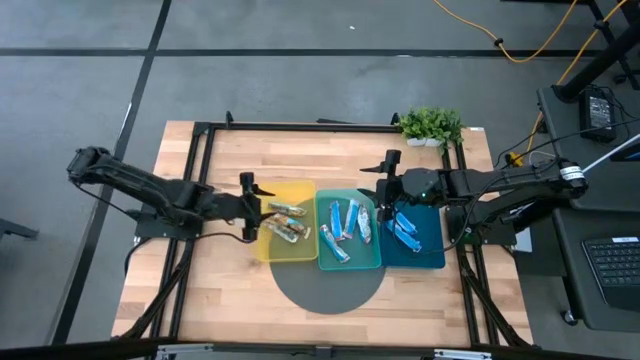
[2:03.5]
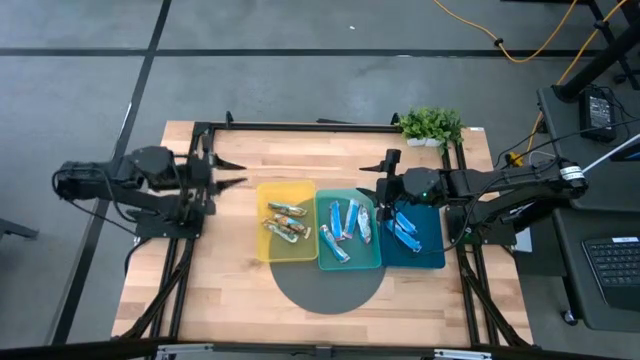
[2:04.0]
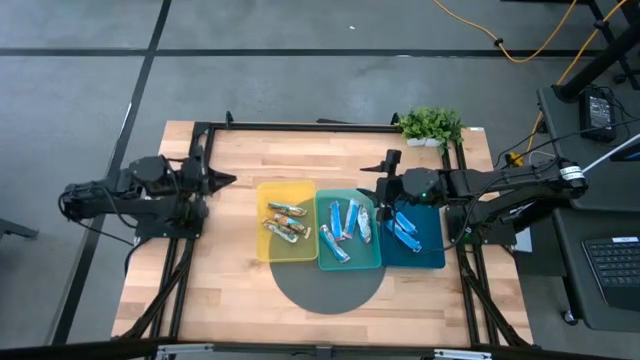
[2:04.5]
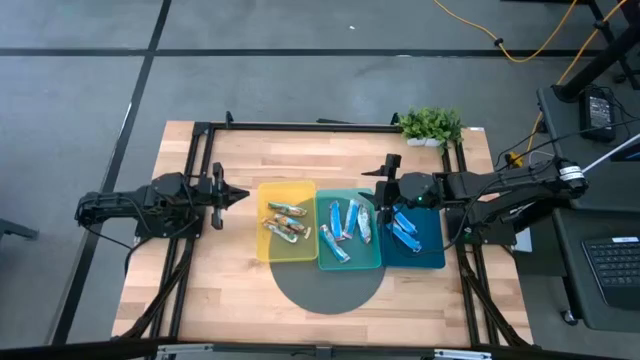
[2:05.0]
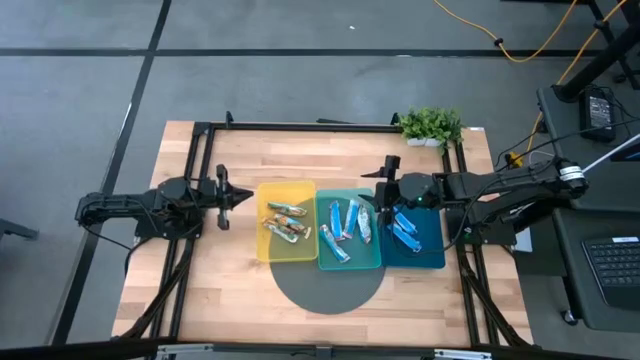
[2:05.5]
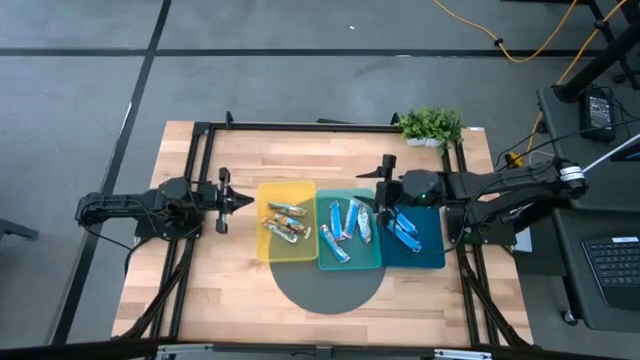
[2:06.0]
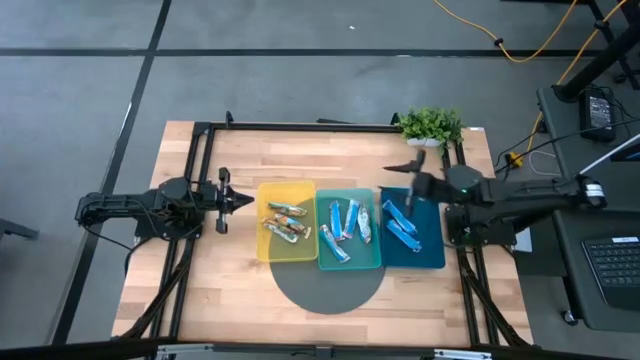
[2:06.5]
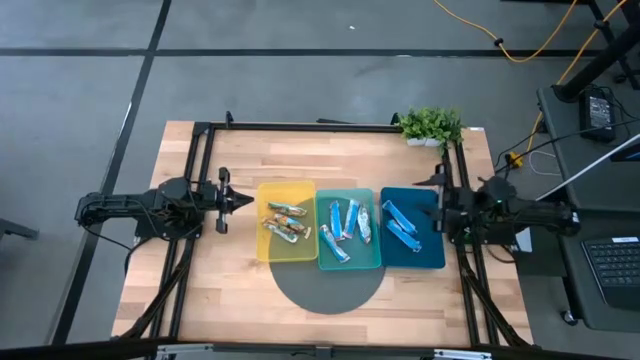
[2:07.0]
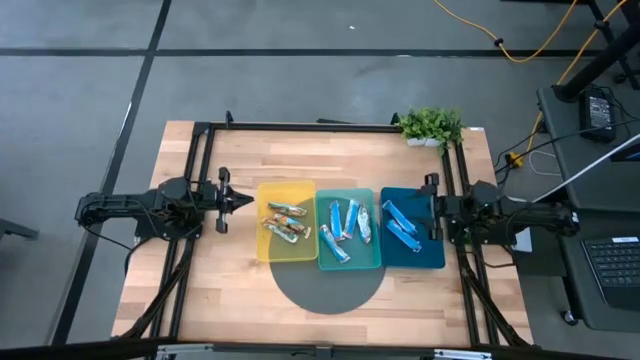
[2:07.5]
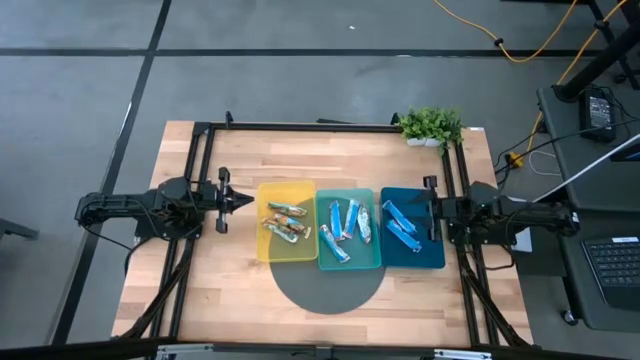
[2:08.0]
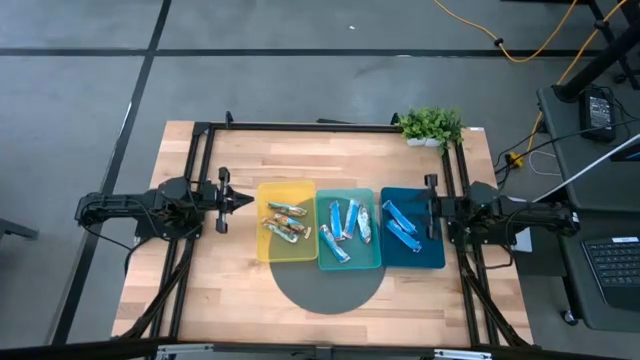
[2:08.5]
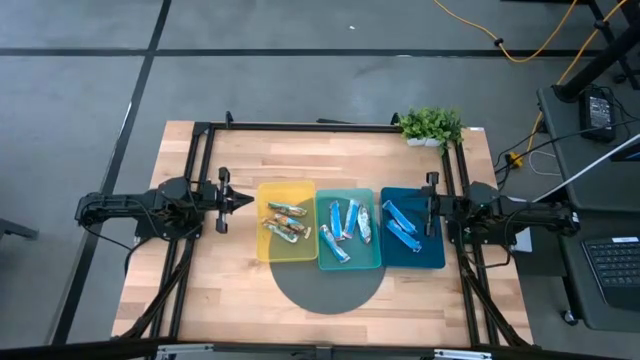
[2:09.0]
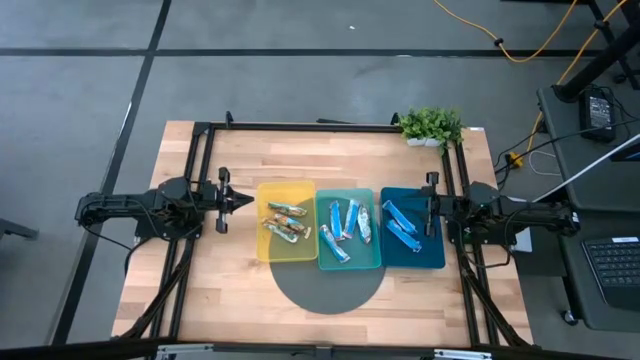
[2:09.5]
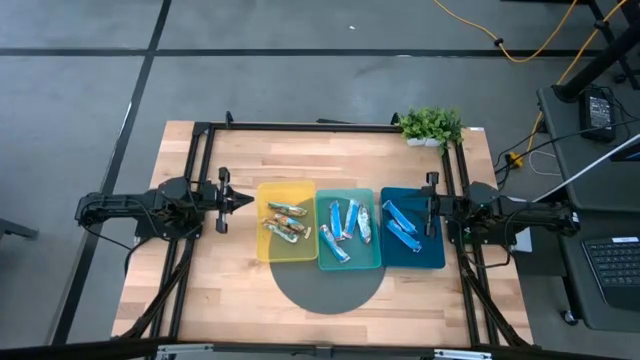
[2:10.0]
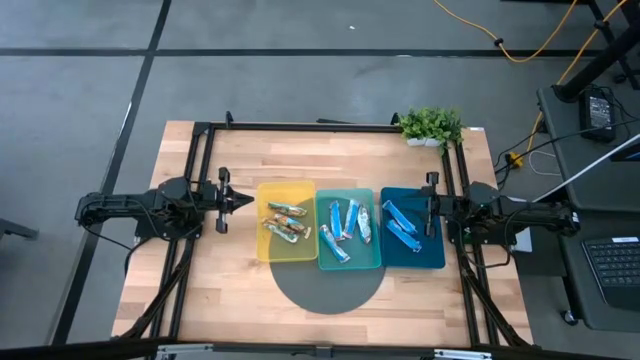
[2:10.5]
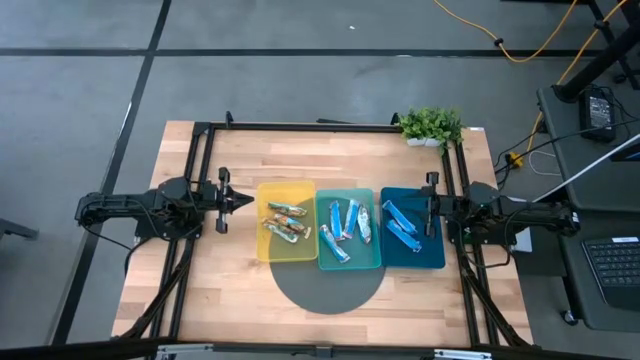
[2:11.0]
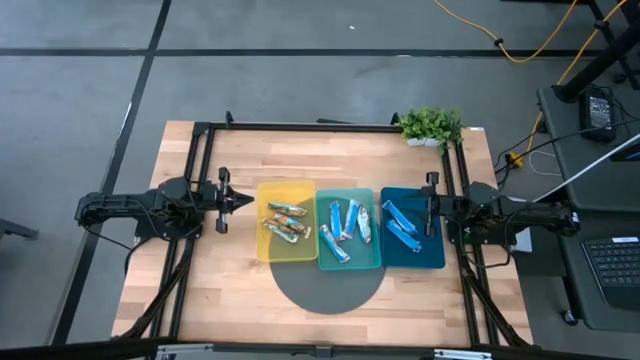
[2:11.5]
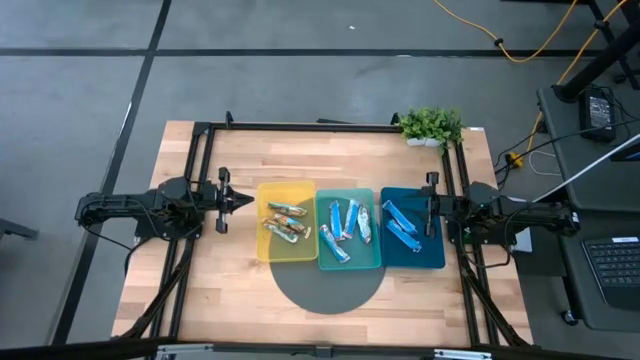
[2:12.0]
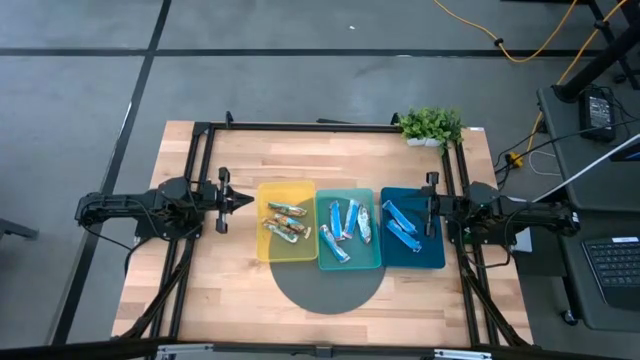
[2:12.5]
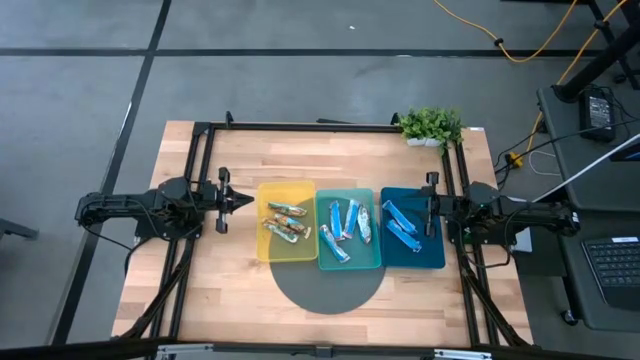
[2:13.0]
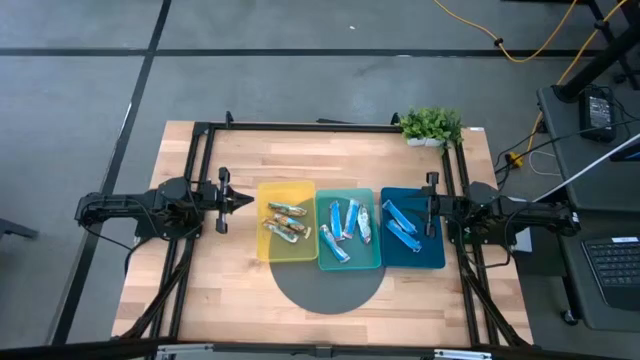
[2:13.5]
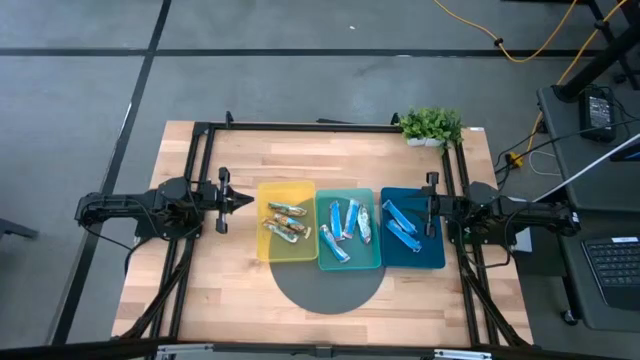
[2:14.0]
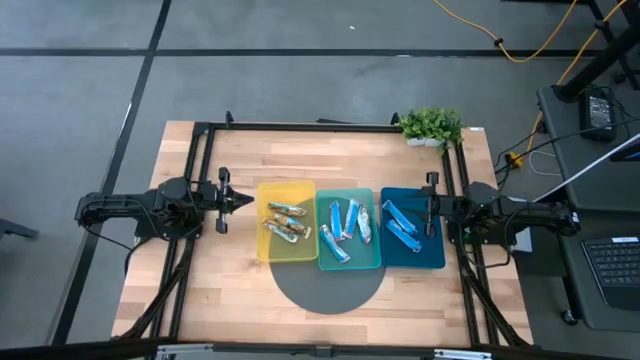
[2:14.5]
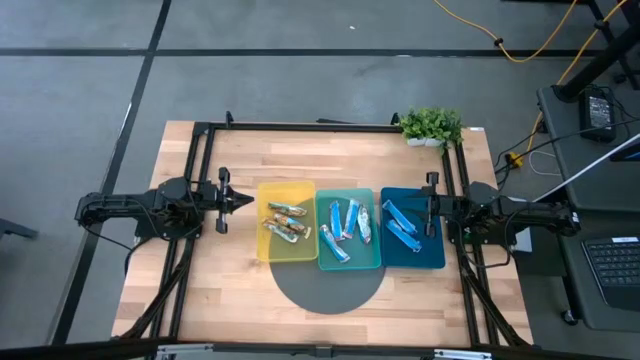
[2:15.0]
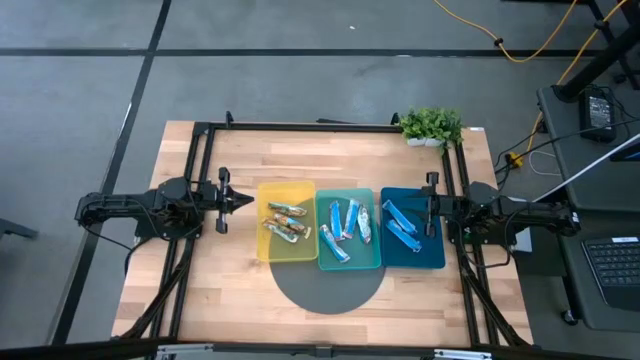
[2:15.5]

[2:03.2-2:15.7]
Task: Pick and place Granola Bars by type
Return to Home Position

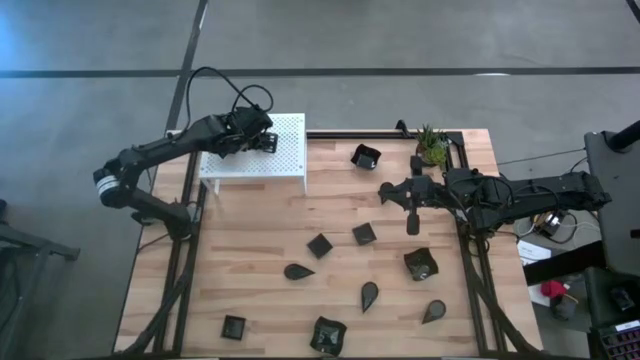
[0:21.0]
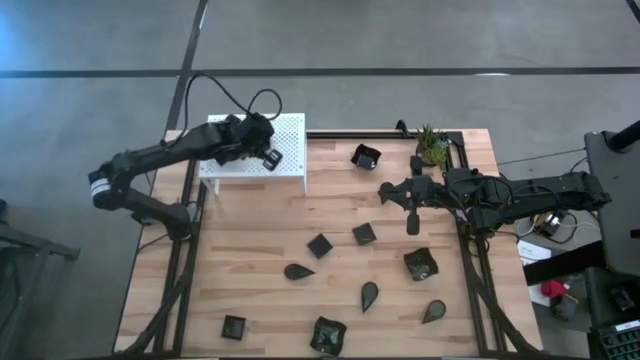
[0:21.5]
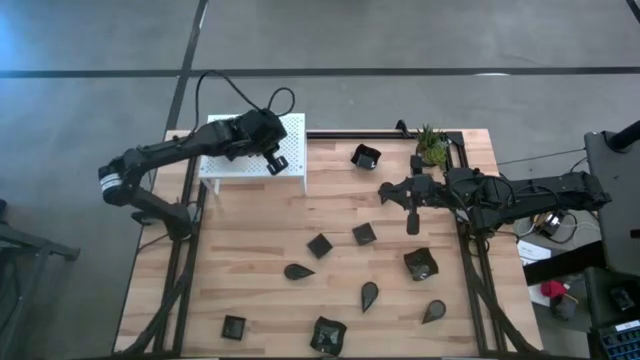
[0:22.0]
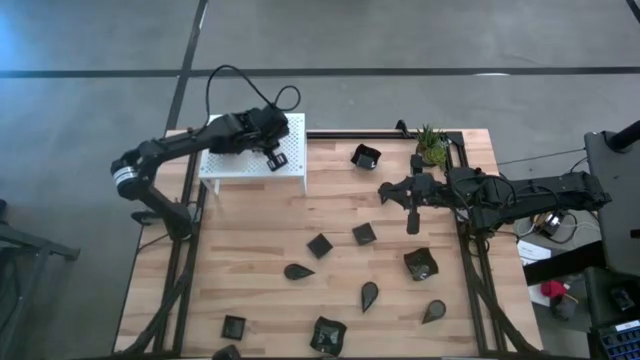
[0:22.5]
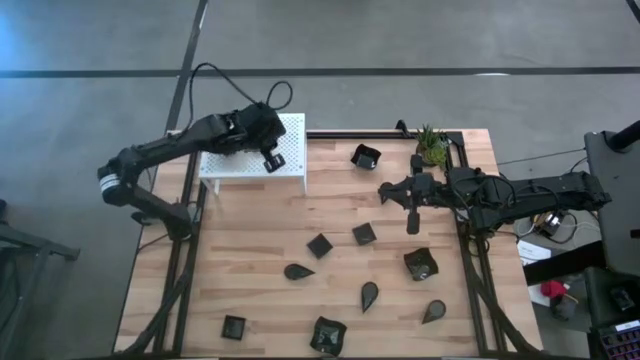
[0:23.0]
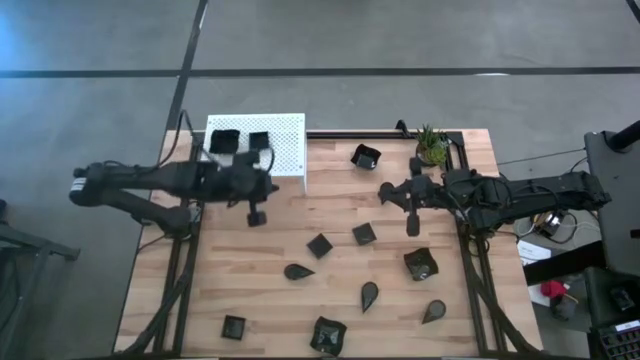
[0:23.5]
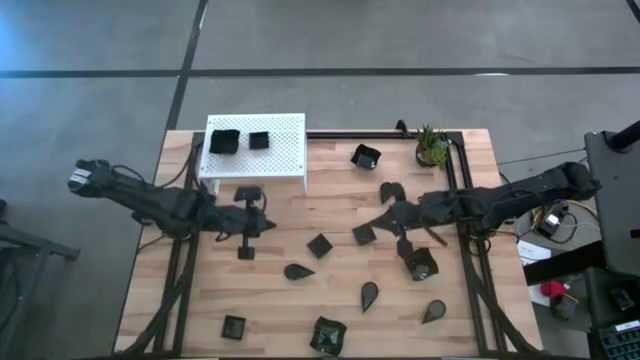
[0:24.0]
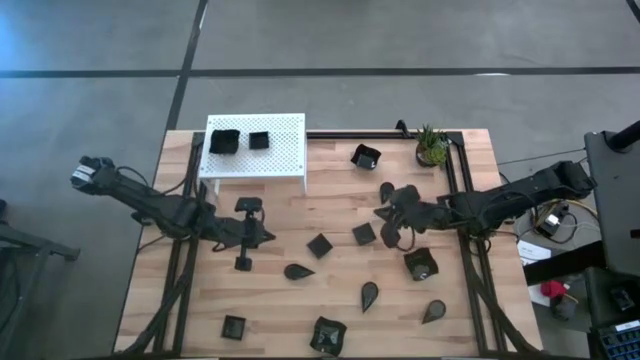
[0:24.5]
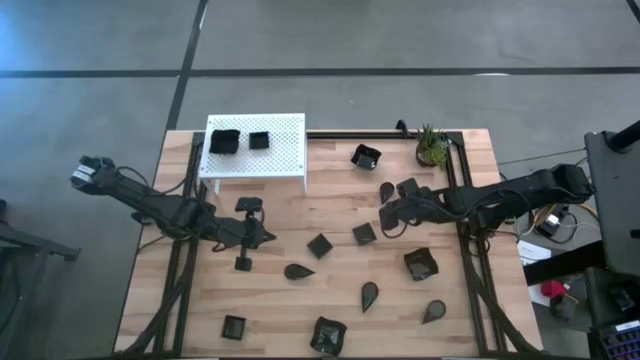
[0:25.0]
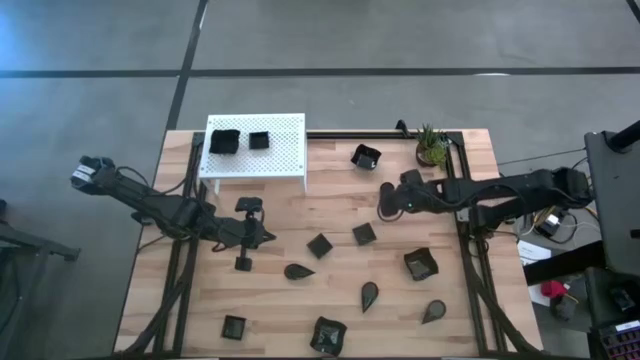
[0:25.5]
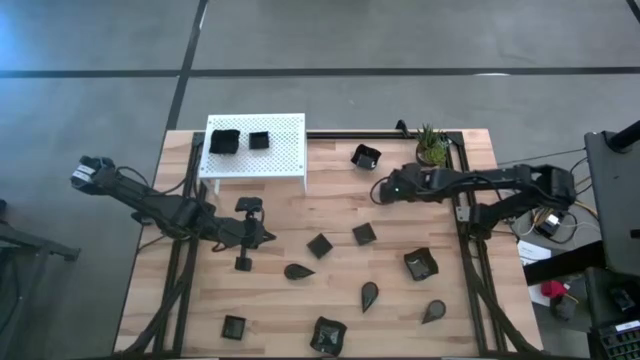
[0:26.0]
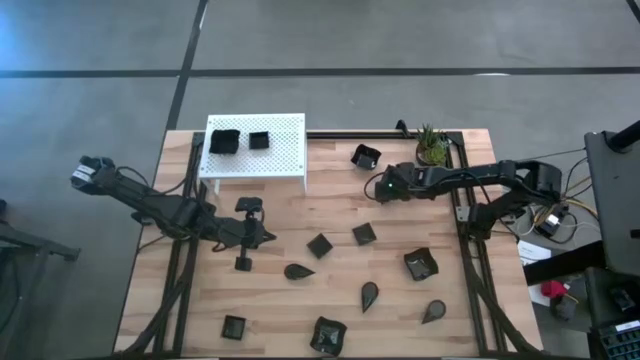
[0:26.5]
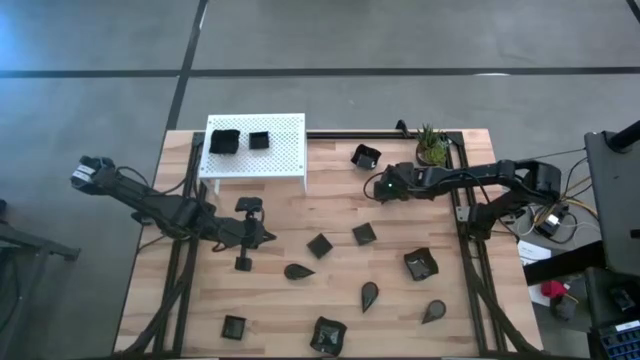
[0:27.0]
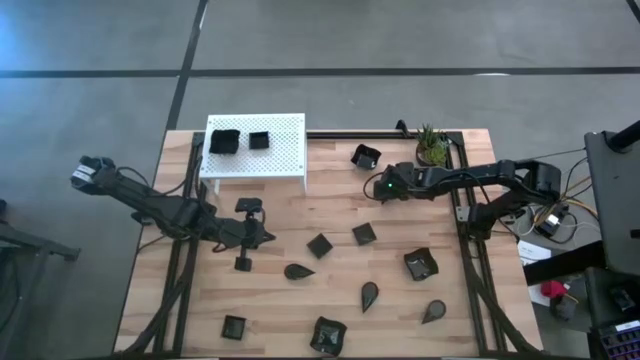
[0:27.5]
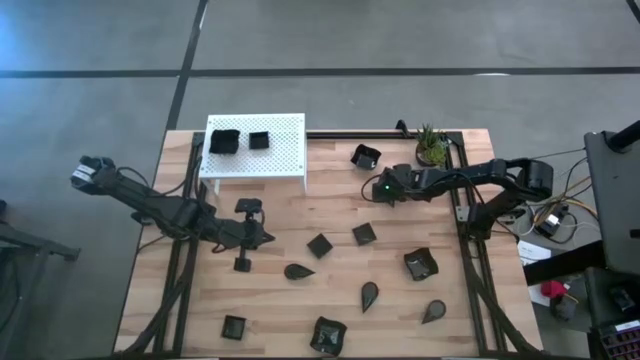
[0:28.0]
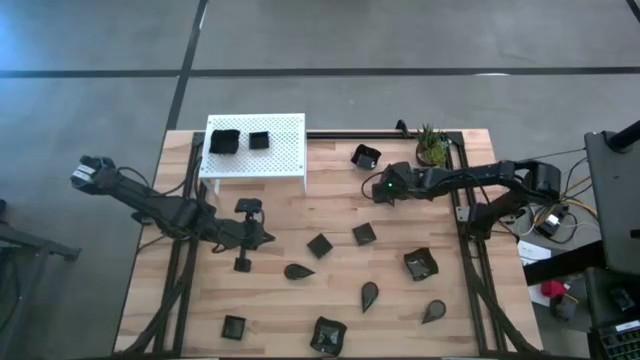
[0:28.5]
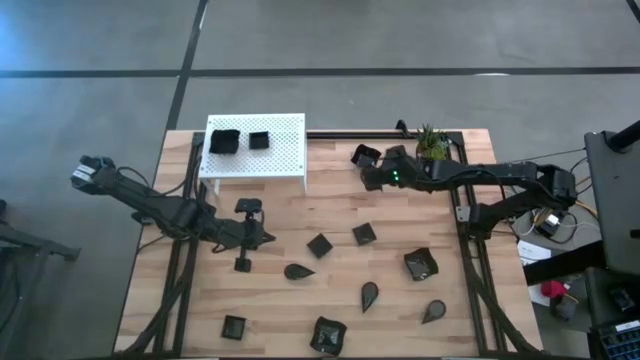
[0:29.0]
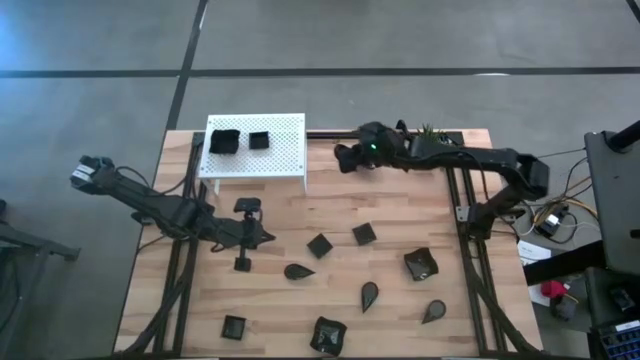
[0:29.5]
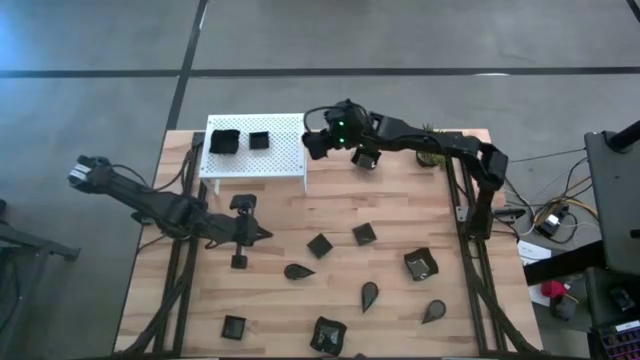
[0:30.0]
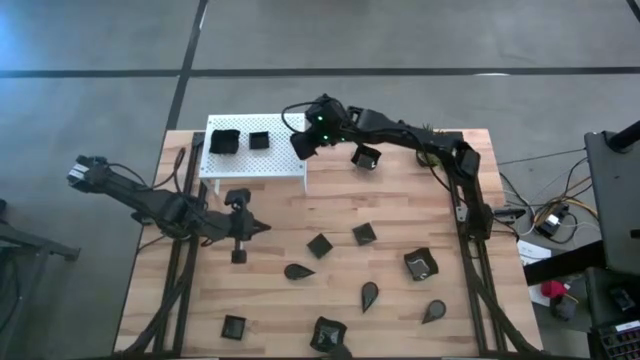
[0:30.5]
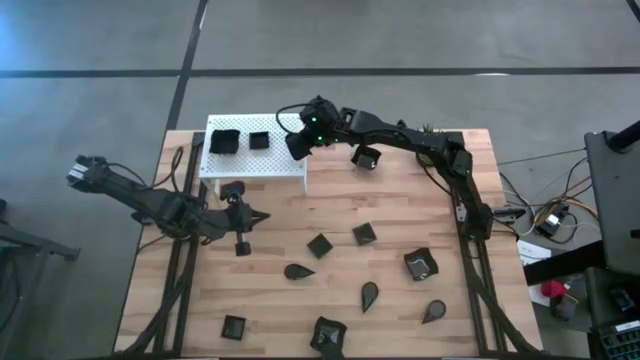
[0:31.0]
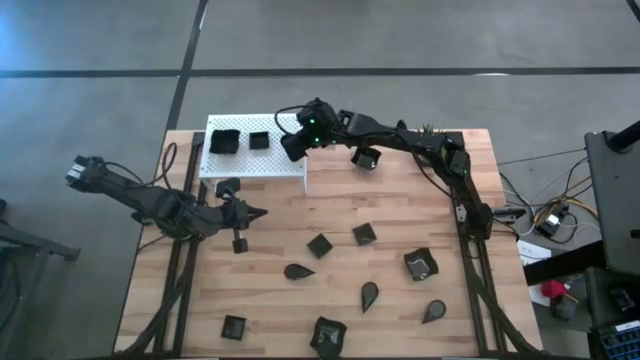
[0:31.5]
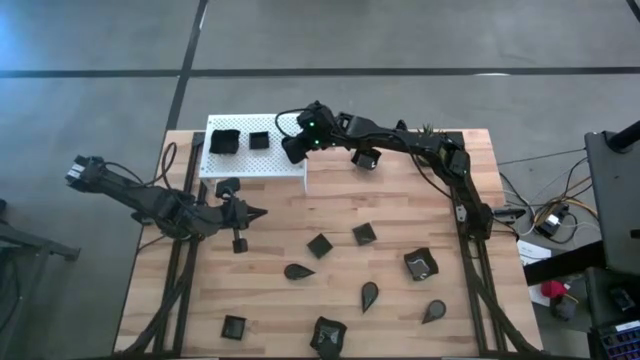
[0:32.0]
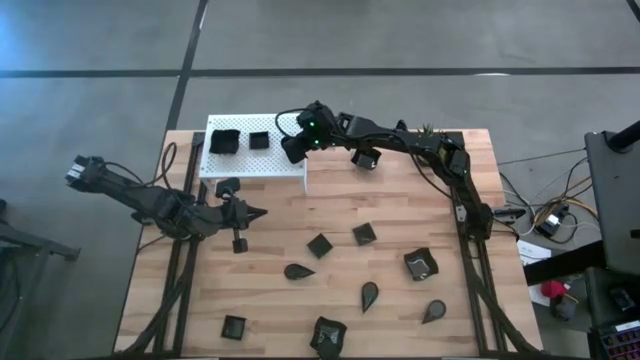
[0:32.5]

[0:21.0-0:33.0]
Task: Pick & Place Mini shaped plates
Put the drop shaped plate on the shelf
